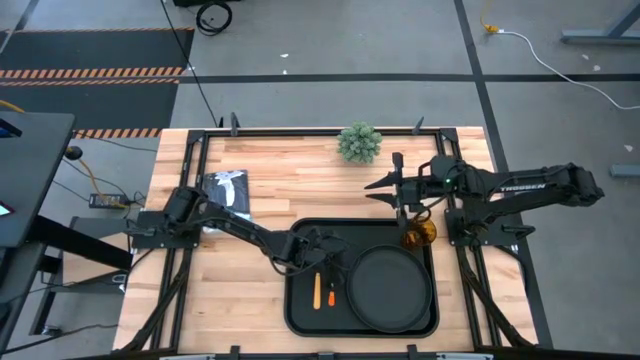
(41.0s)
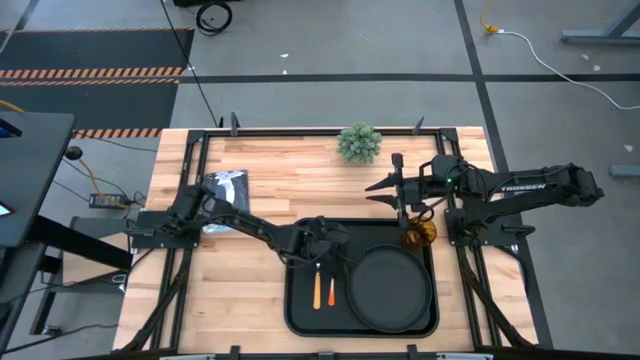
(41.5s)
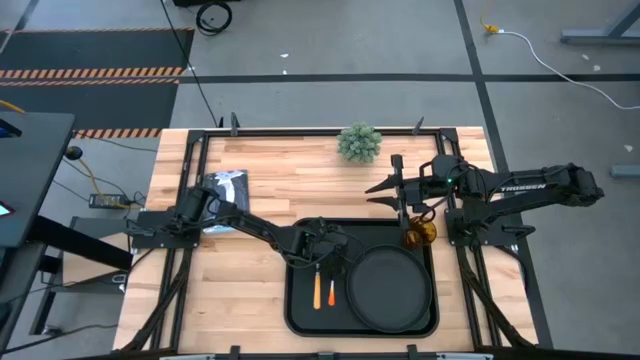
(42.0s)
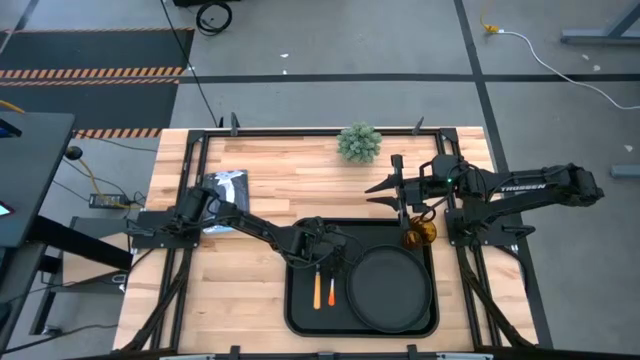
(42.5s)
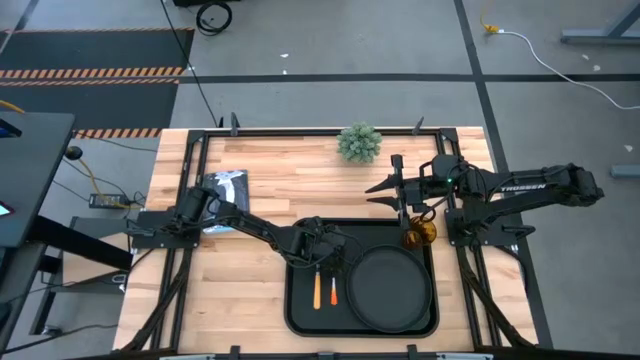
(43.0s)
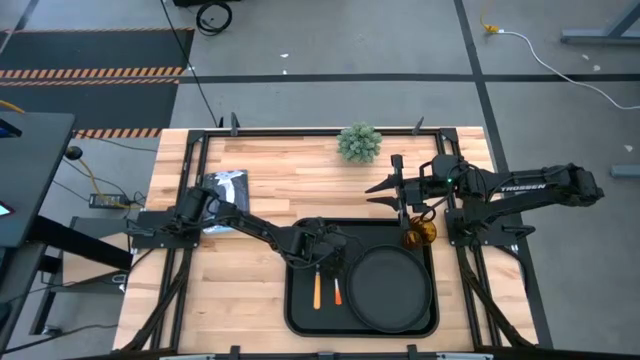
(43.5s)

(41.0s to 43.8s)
Task: Pick and place plate/cup/fork/spoon on tray
Adjust the orange fork on the black tray

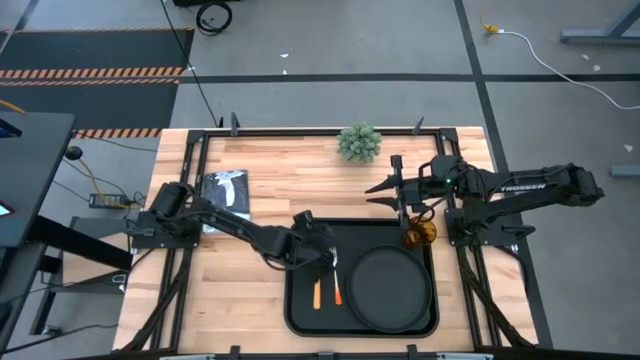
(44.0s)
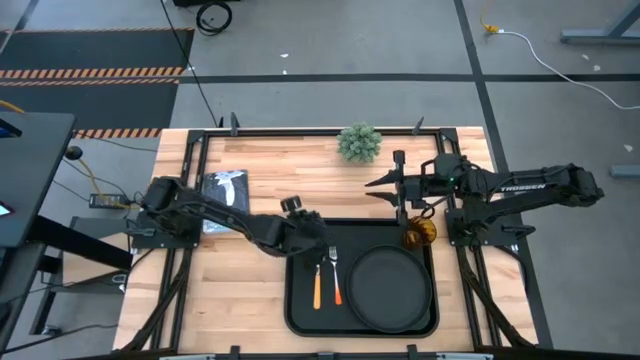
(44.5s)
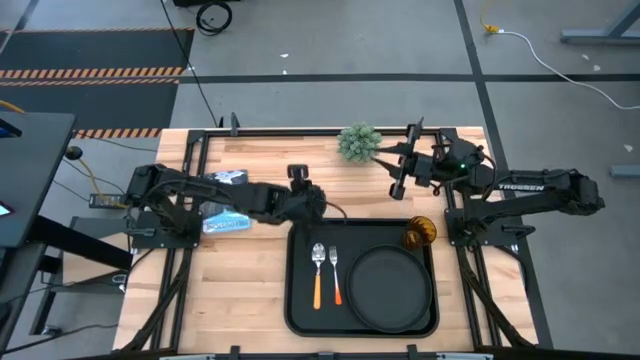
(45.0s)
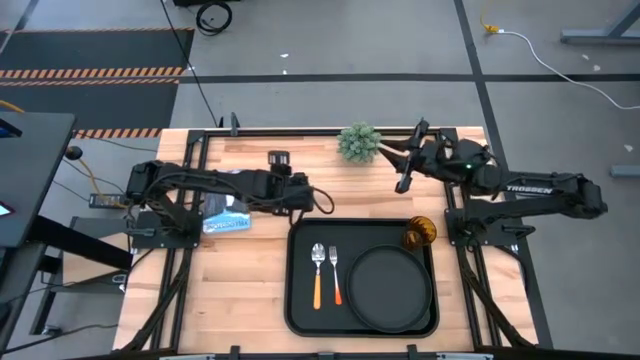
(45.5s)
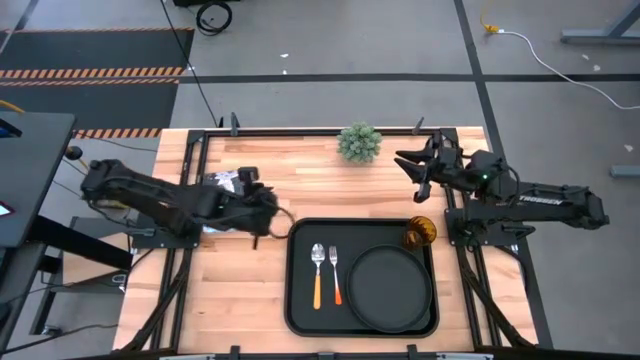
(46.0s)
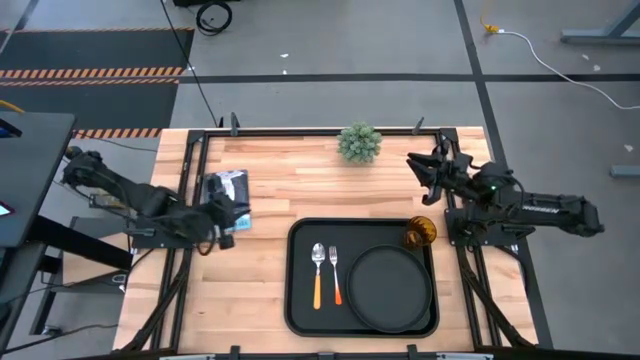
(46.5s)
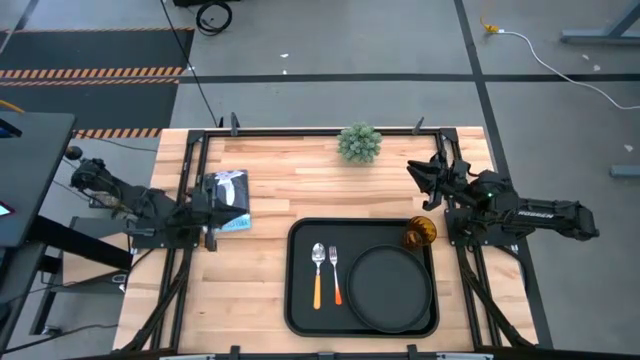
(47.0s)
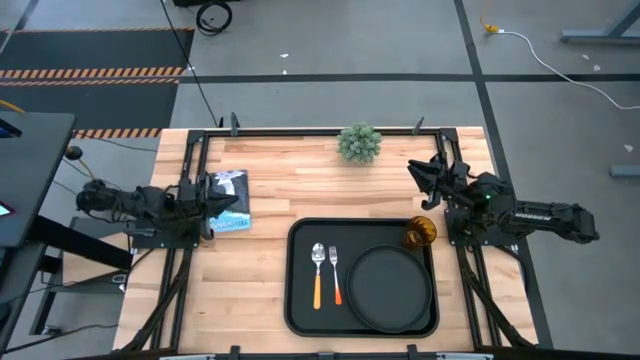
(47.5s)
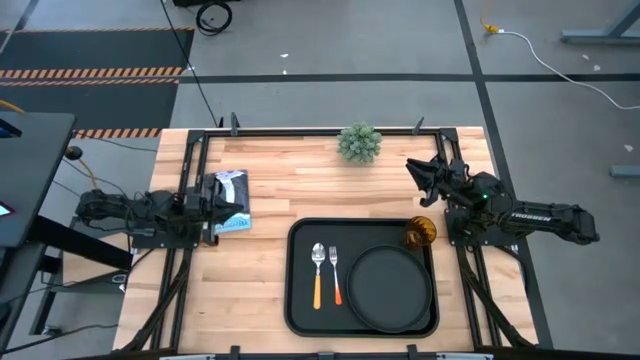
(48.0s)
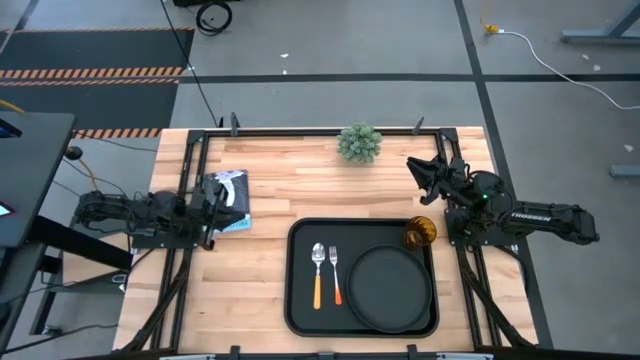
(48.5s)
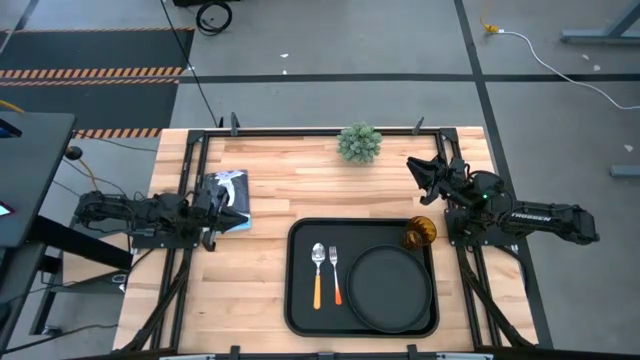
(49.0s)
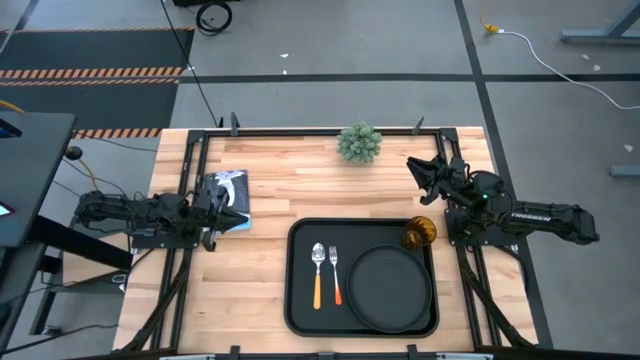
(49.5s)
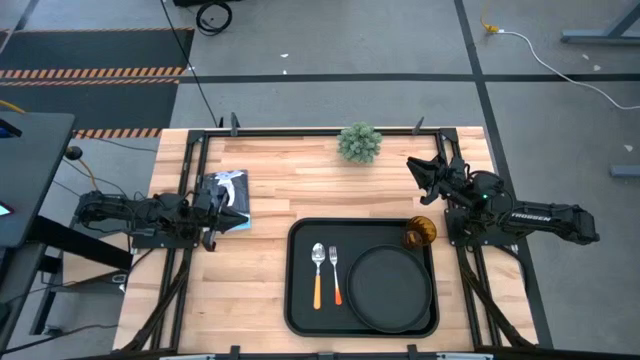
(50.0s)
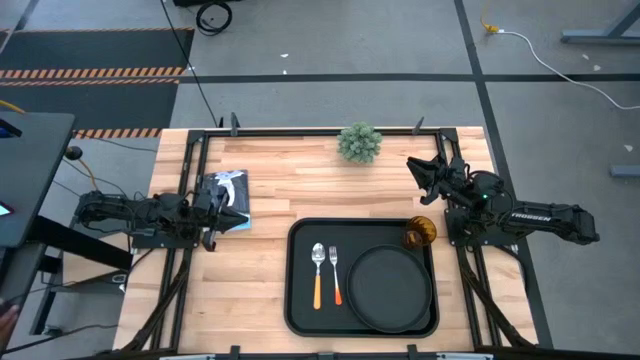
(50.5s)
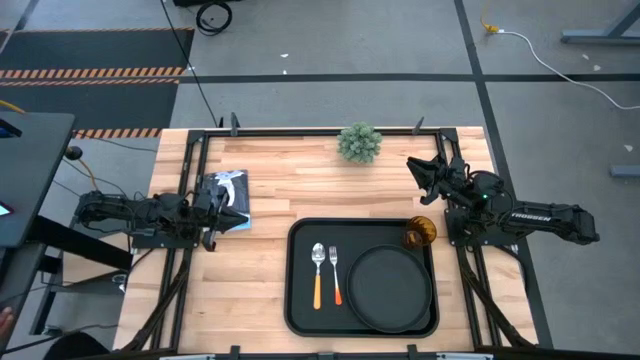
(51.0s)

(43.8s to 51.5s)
Return to Home Position

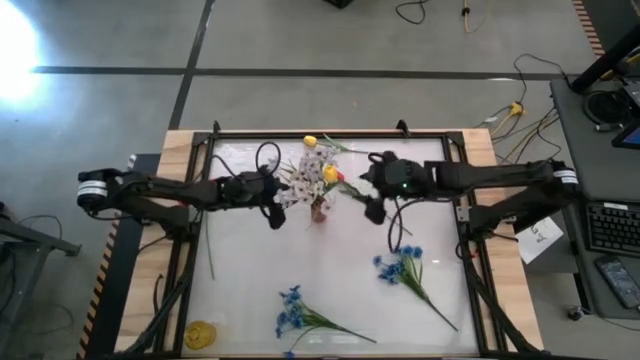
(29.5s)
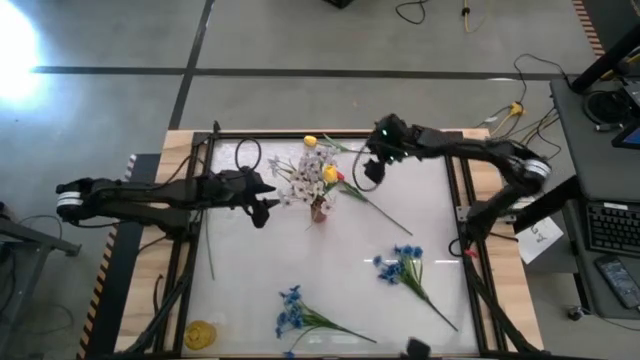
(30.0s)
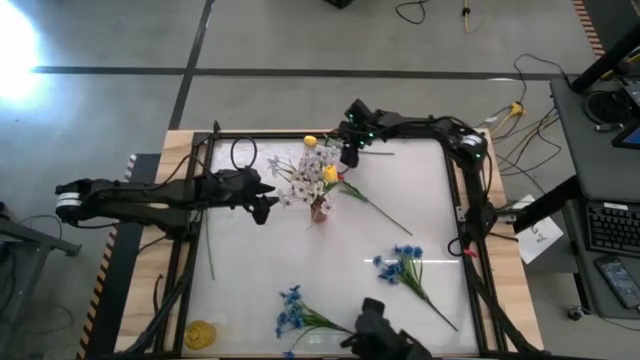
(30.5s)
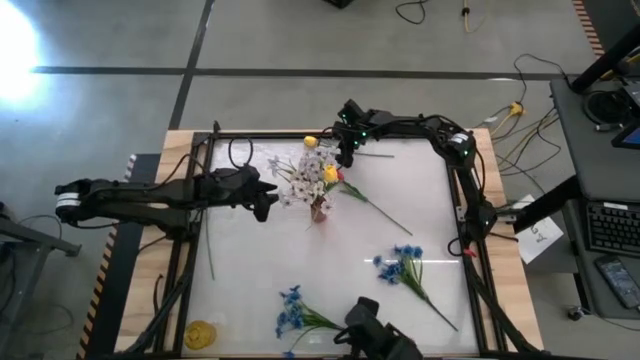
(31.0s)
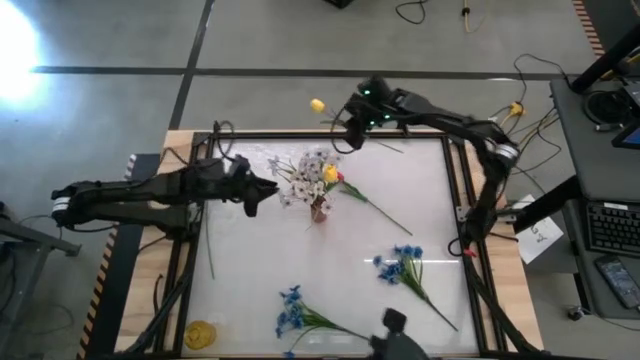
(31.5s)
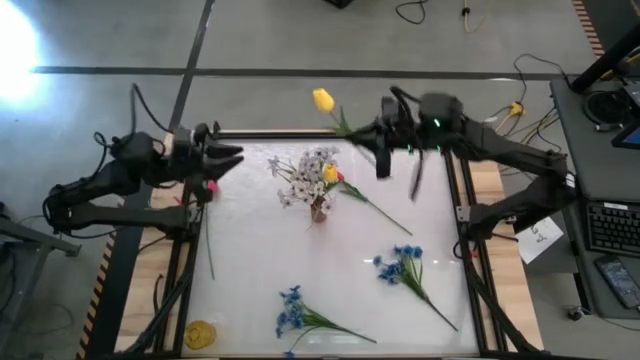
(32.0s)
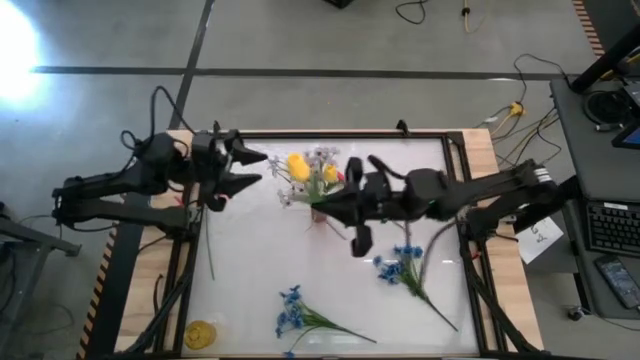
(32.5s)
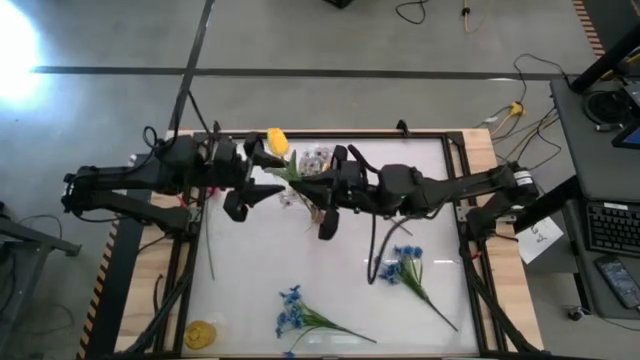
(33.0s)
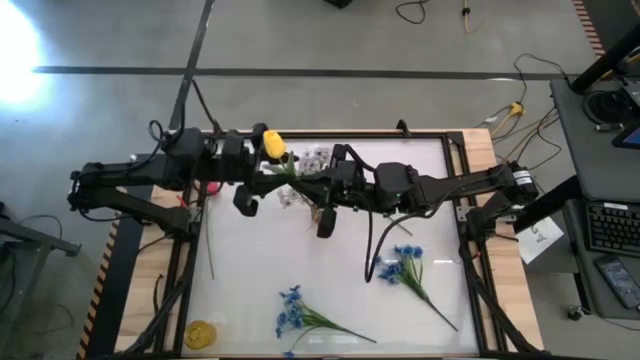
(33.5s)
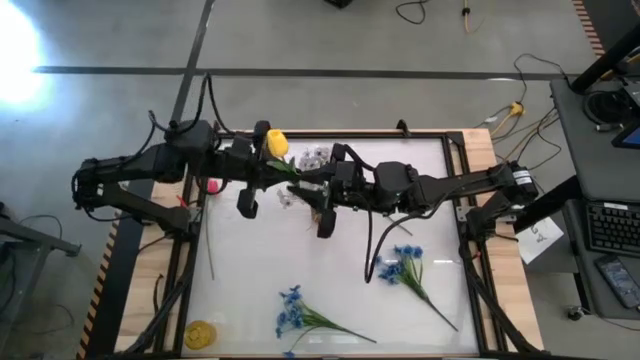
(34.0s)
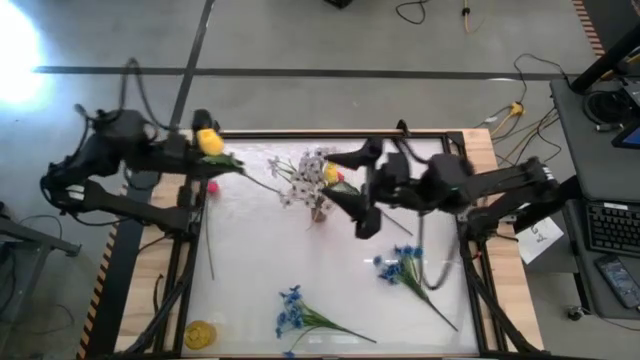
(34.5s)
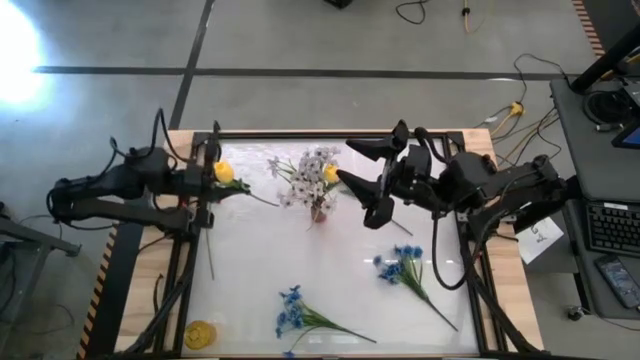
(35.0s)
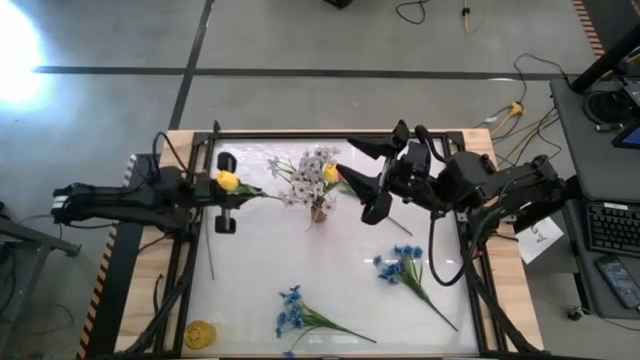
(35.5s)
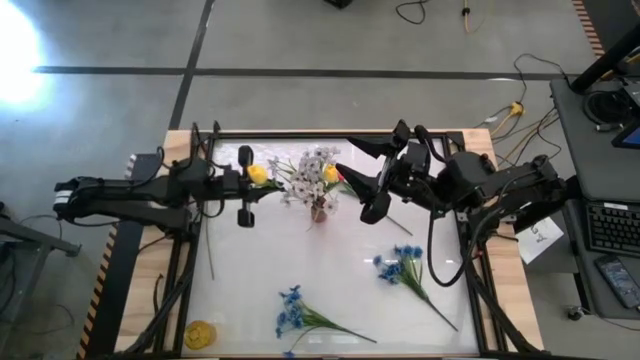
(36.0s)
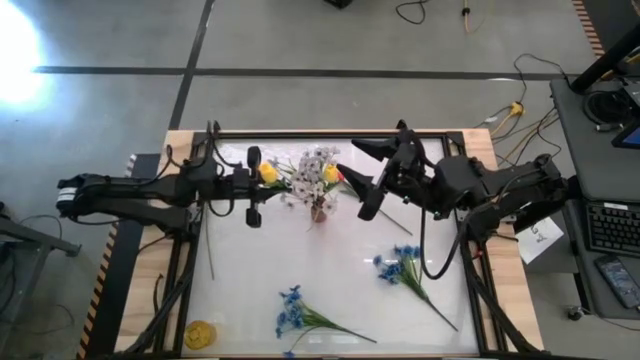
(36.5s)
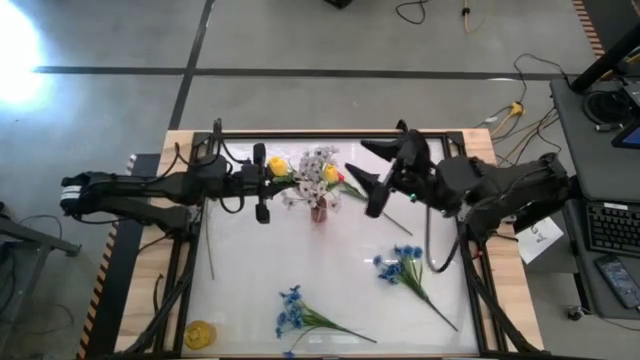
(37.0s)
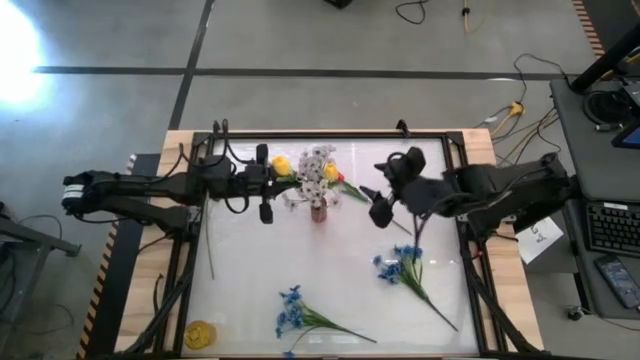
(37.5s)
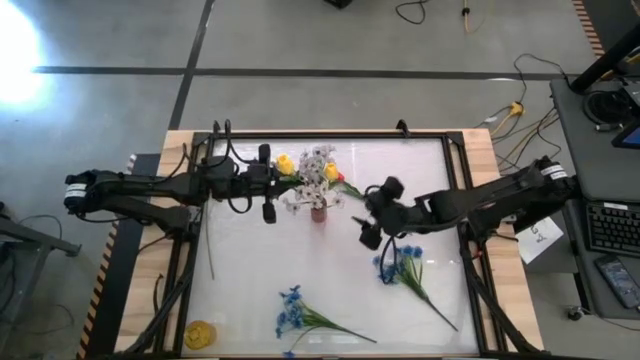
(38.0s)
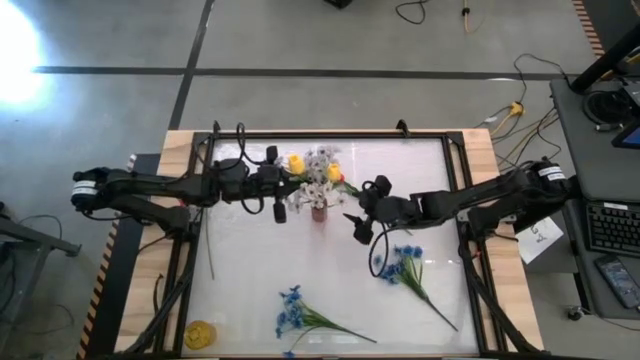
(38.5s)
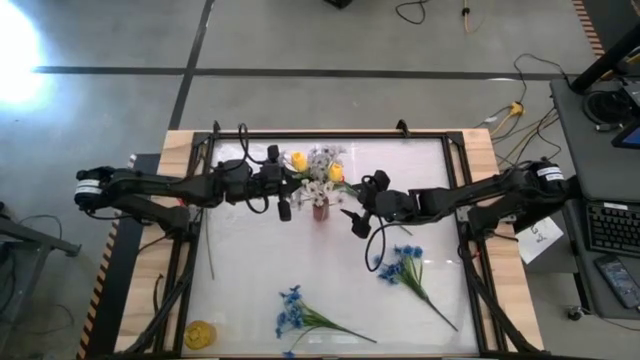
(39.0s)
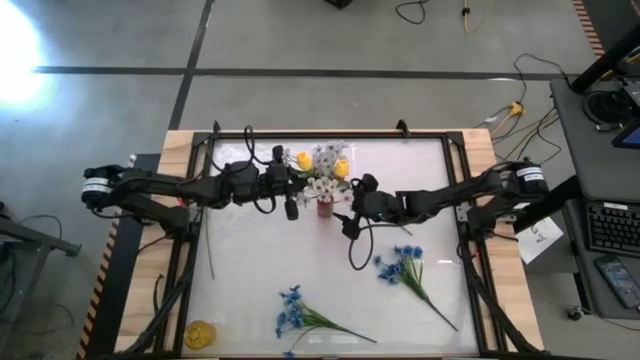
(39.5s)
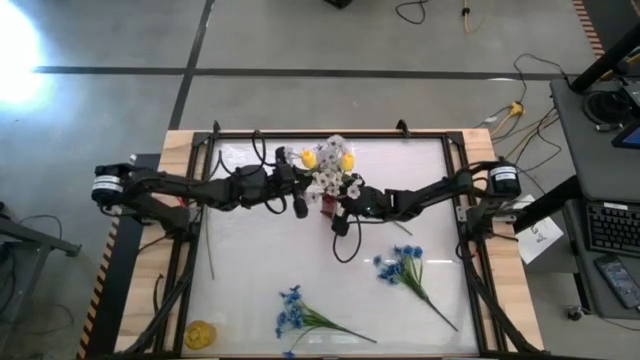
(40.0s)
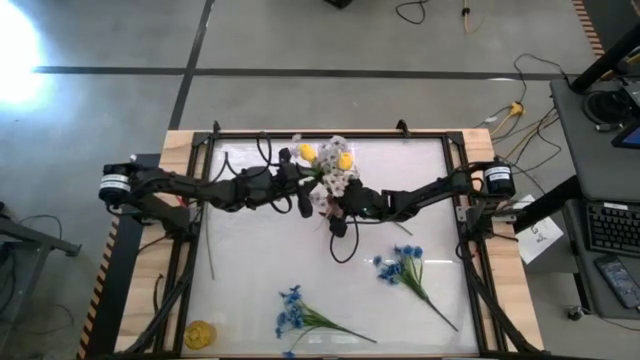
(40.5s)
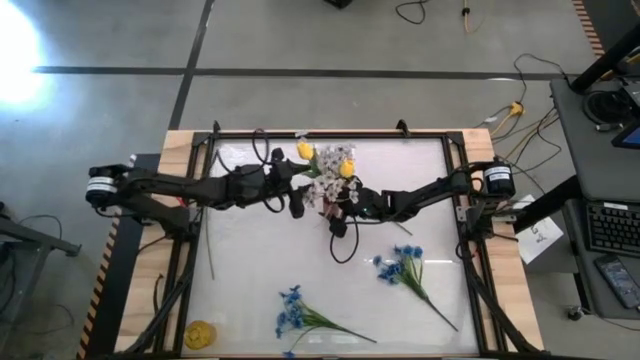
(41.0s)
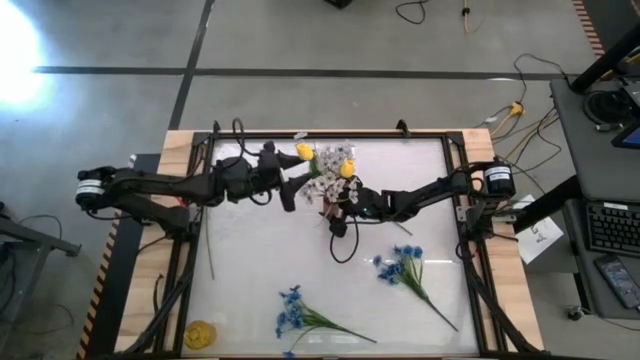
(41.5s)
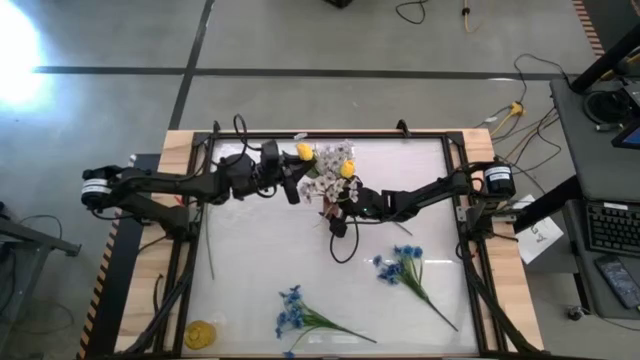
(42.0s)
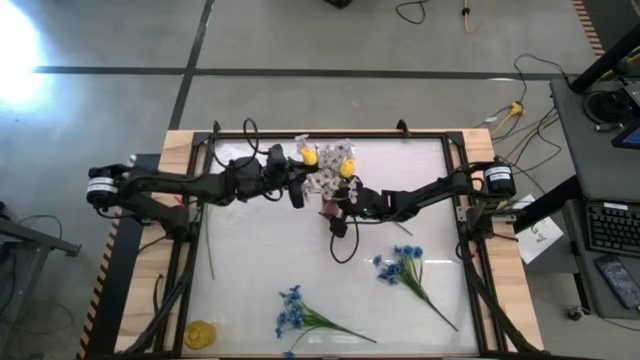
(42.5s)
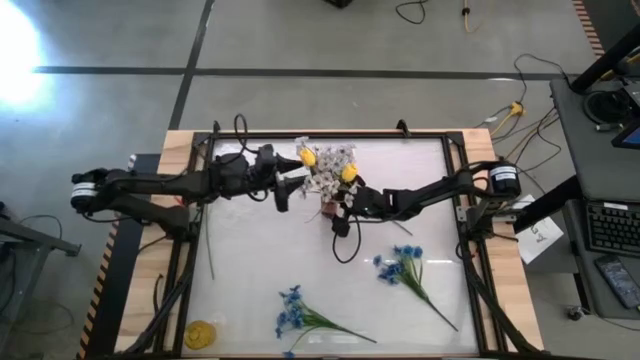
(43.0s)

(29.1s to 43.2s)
Task: Sort flowers into vase by color
Put the yellow tulip into the red flower vase
